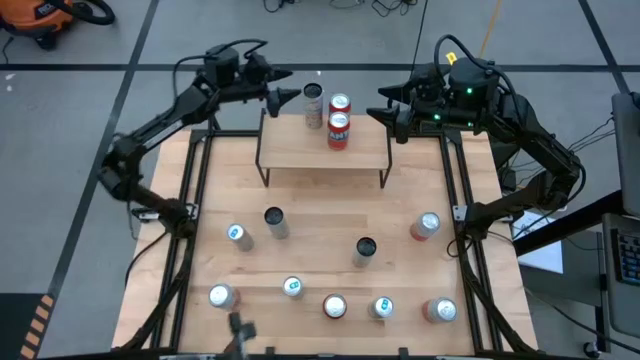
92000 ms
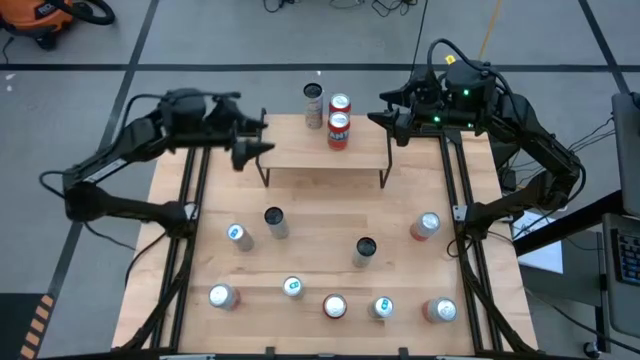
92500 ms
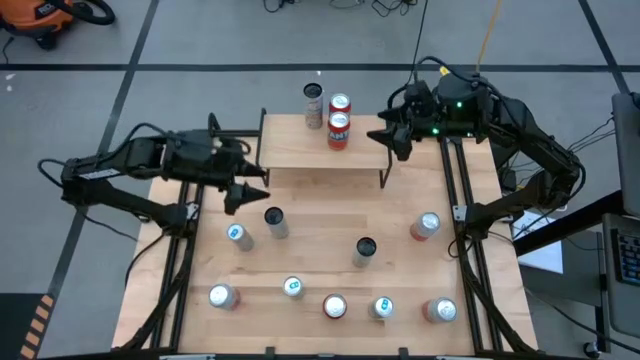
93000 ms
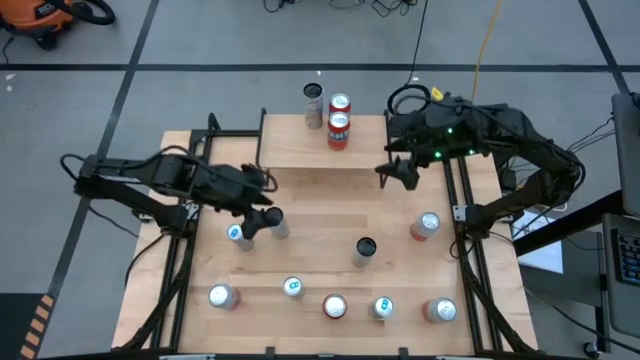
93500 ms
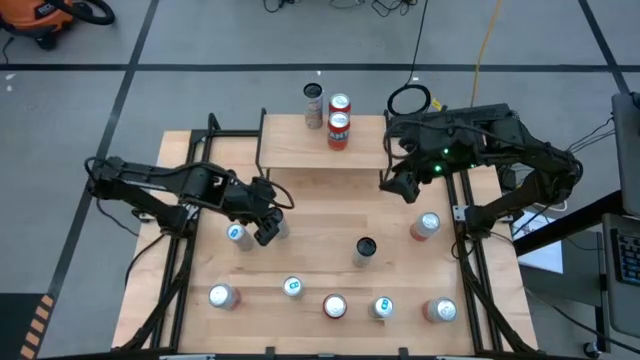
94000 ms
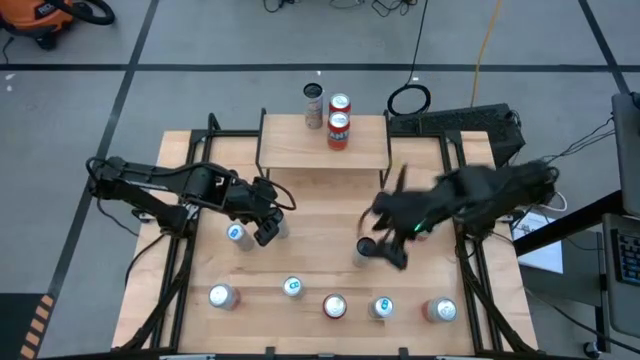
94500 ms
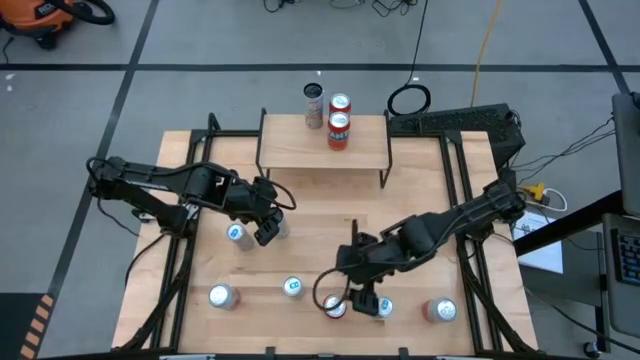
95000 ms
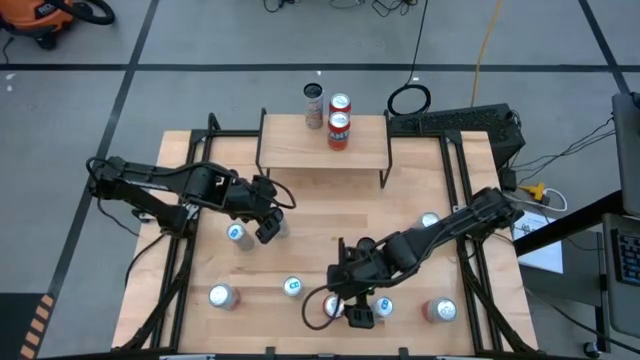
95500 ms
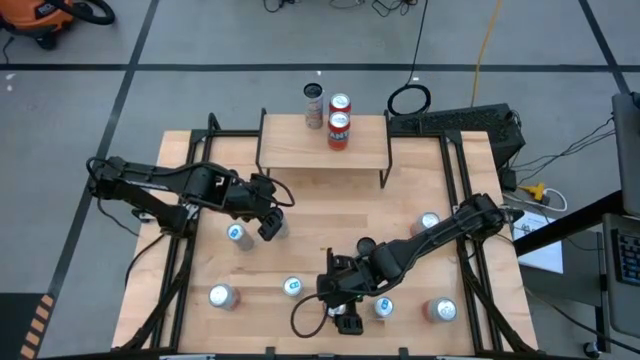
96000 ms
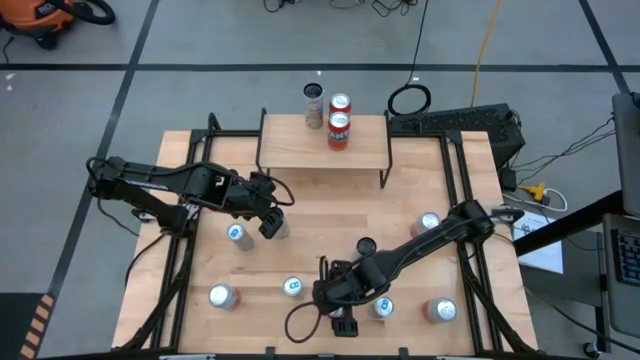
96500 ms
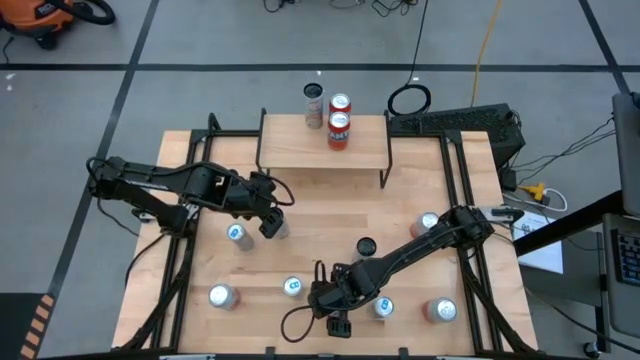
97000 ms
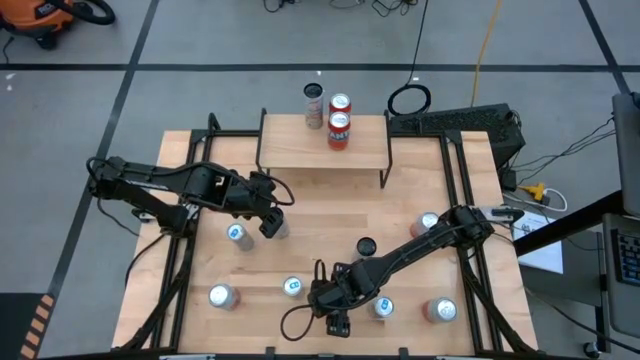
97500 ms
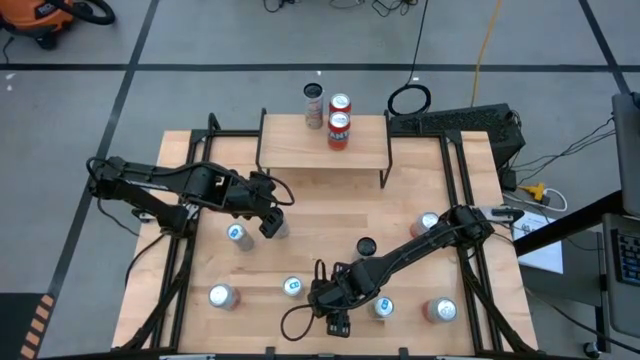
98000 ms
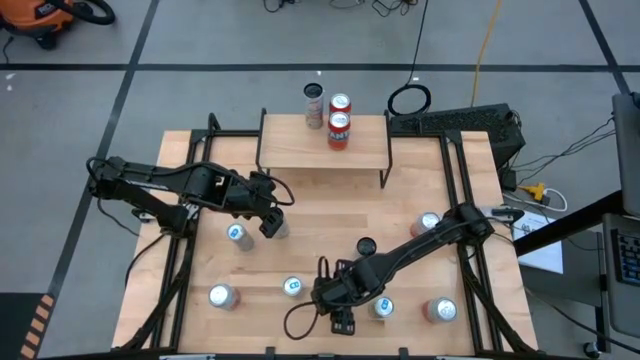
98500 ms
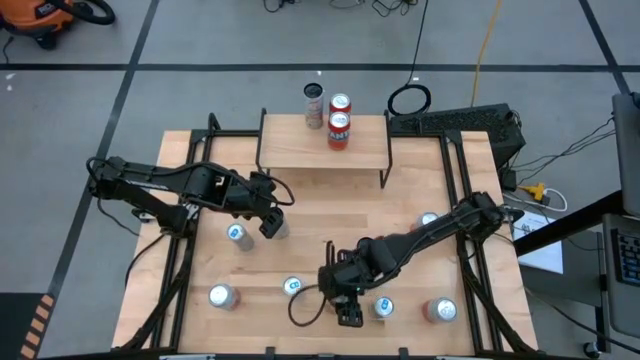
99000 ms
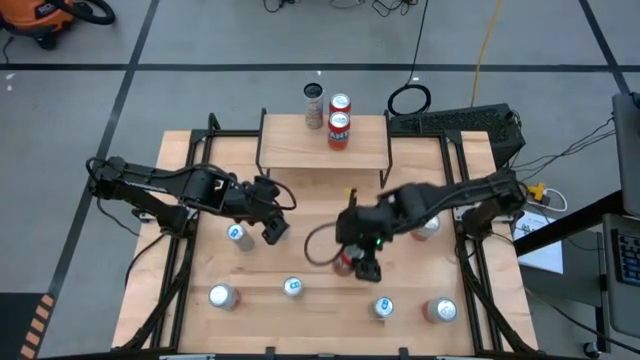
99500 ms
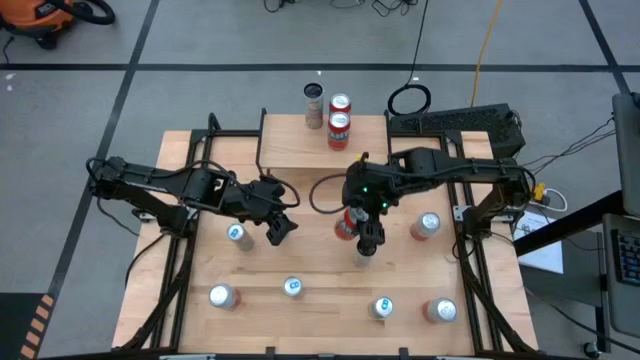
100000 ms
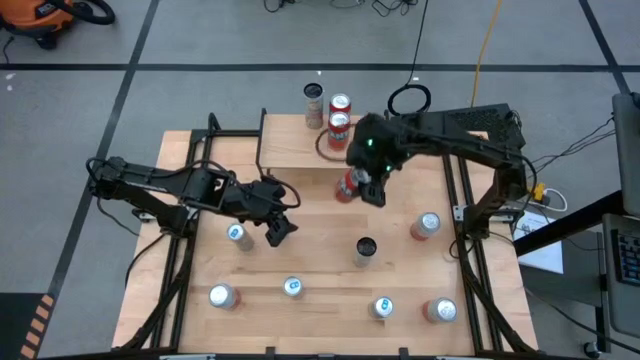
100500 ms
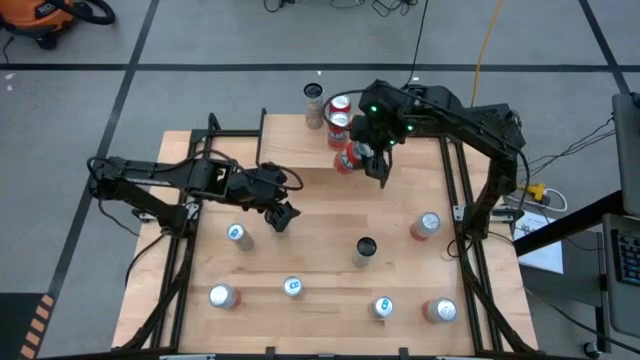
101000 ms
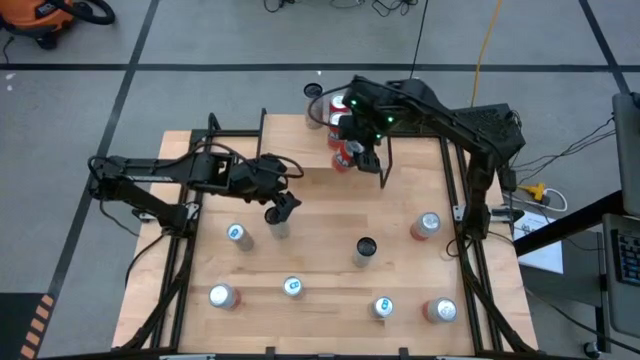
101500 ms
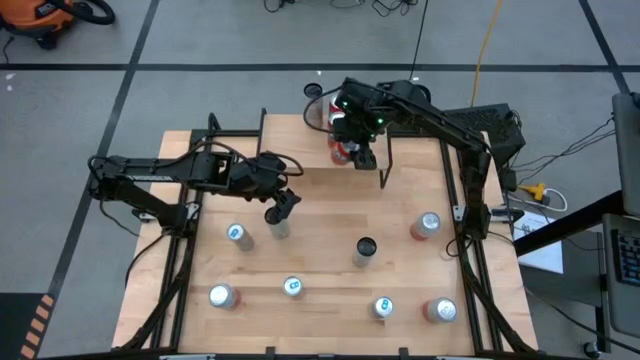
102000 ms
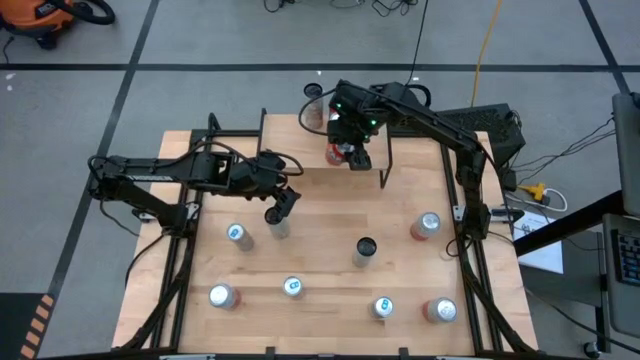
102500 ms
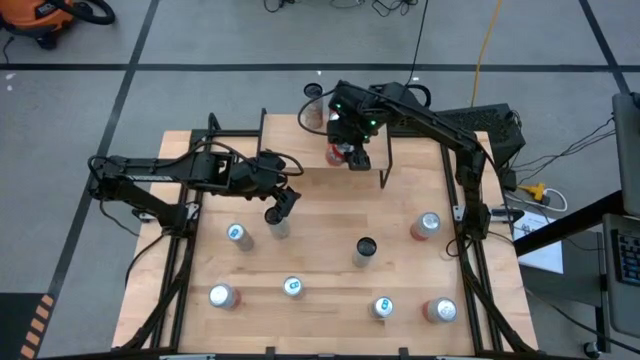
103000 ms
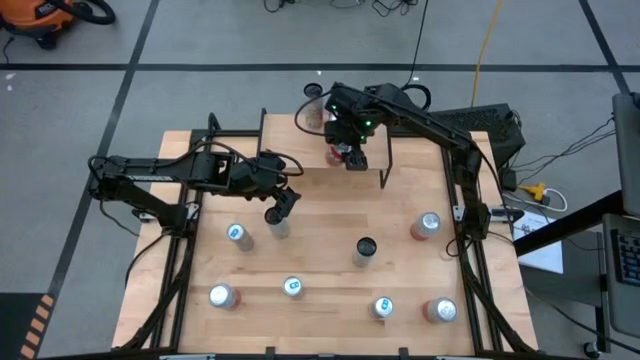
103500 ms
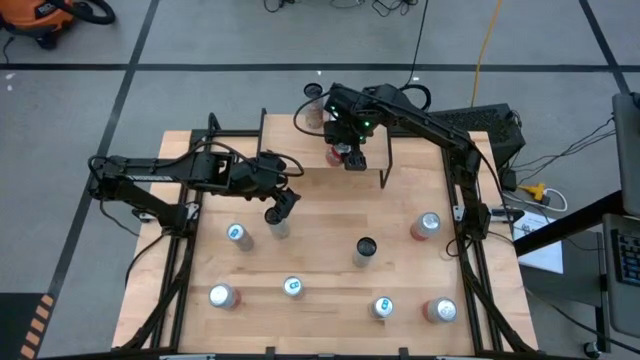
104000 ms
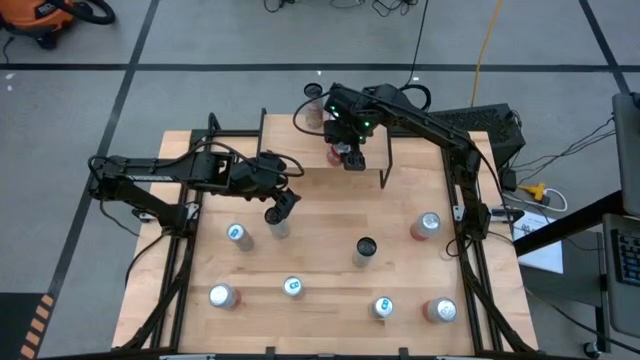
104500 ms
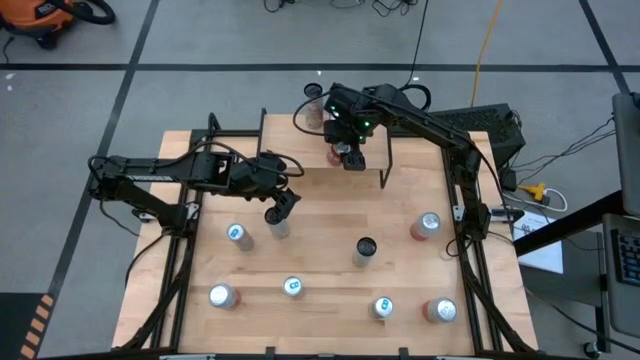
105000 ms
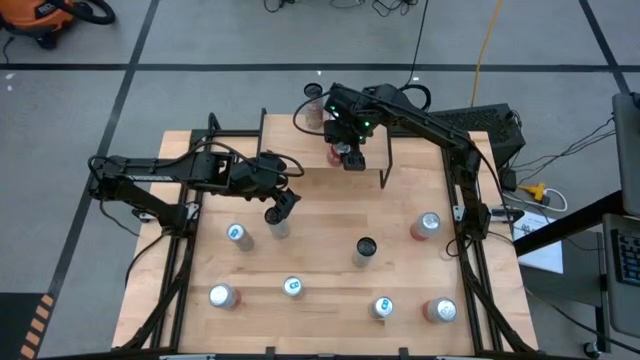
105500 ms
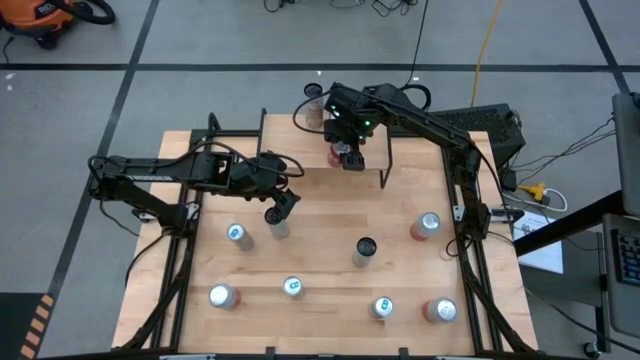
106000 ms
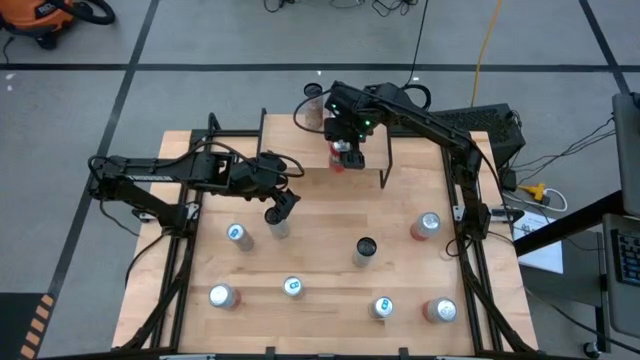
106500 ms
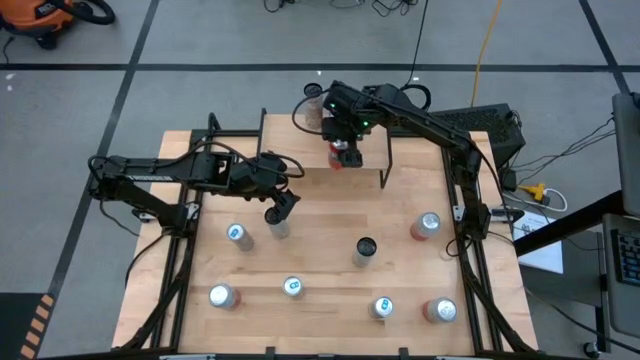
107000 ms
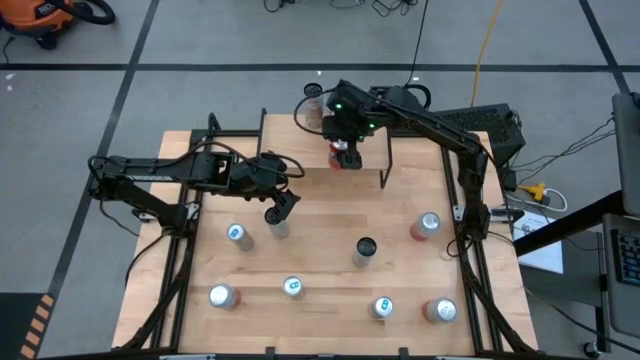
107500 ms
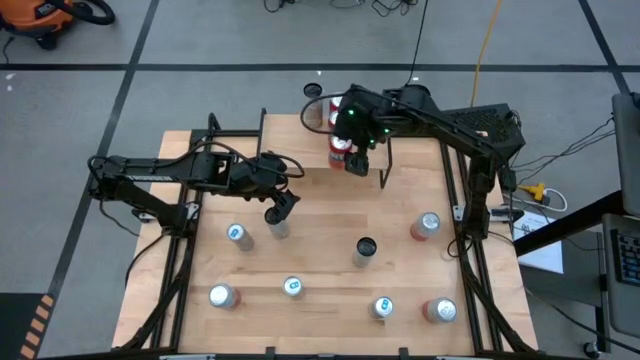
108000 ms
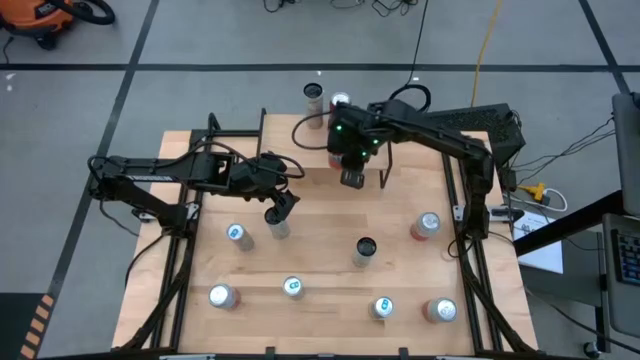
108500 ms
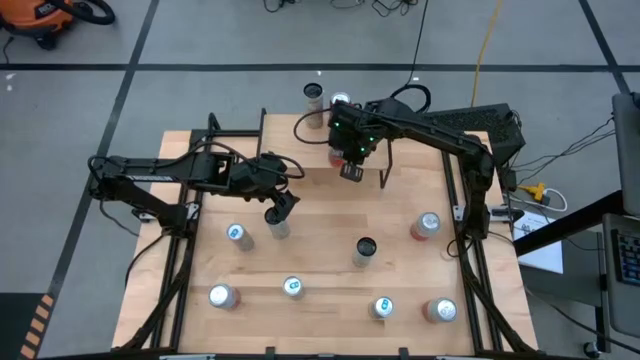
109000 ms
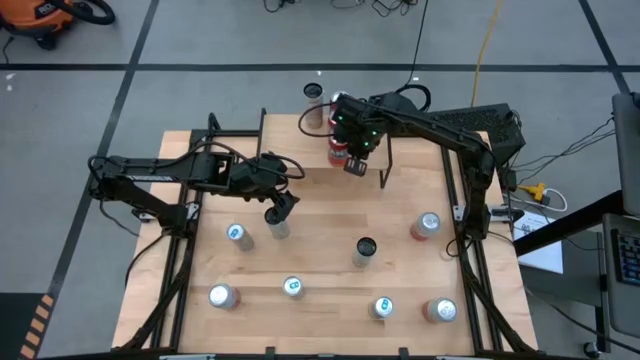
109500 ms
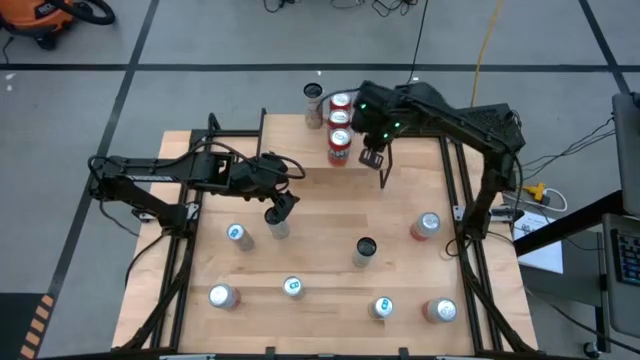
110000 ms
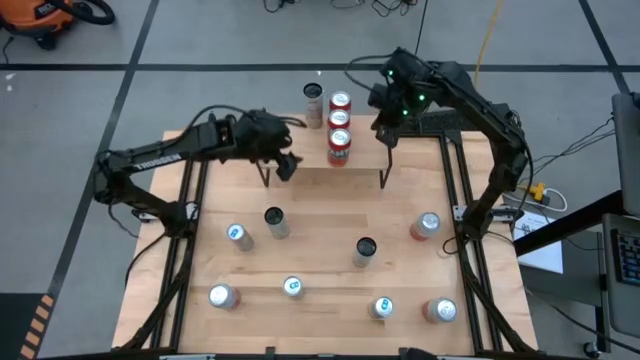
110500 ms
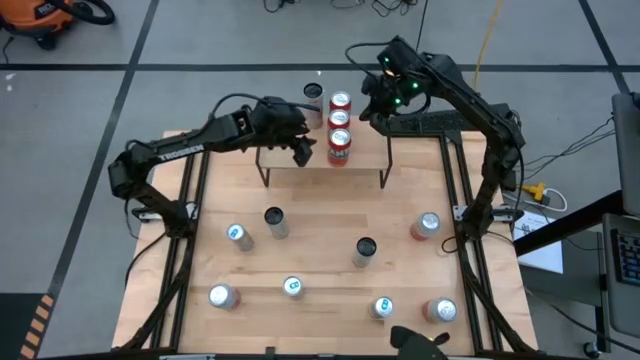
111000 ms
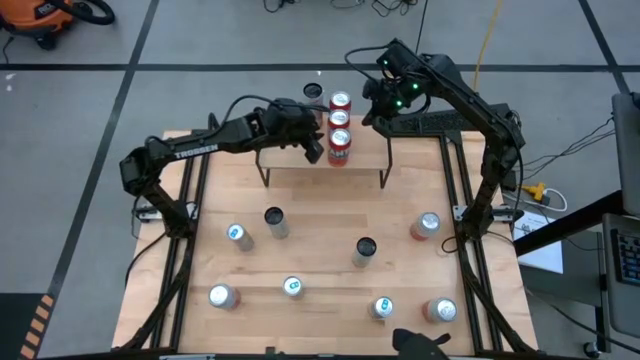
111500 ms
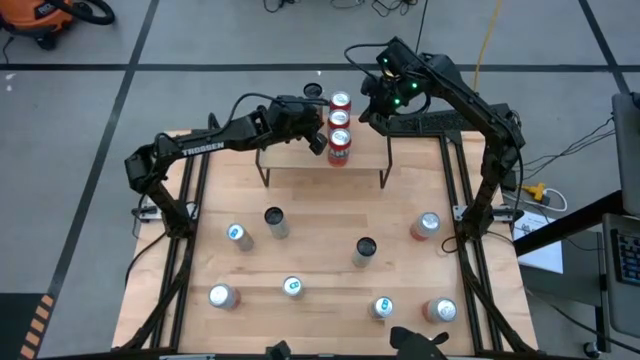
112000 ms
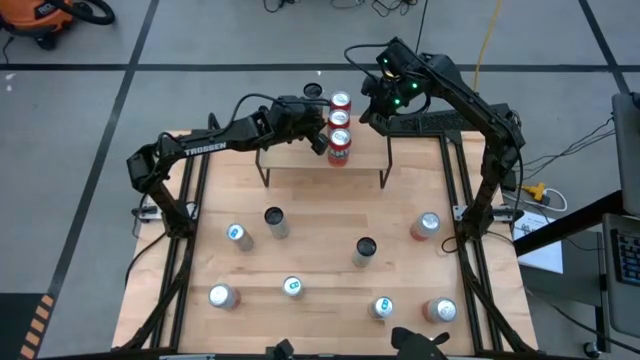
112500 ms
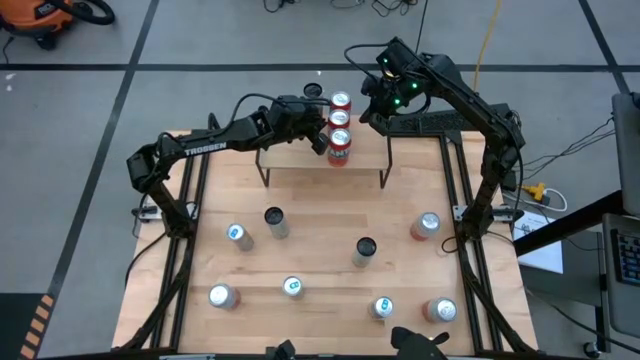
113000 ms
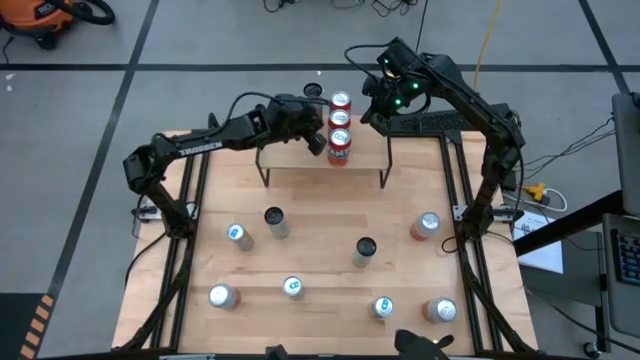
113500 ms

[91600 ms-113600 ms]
Task: Place canned beverage on shelf
Put the orange soda can aligned with the other orange soda cans on the shelf
